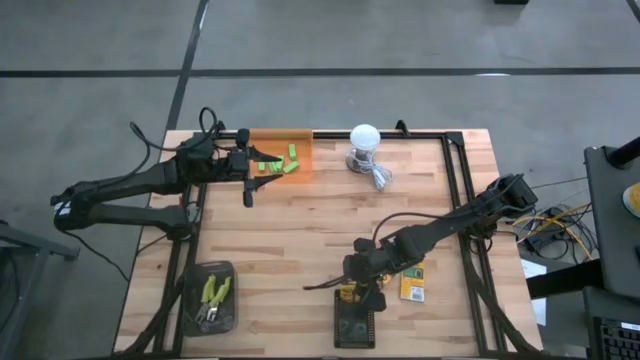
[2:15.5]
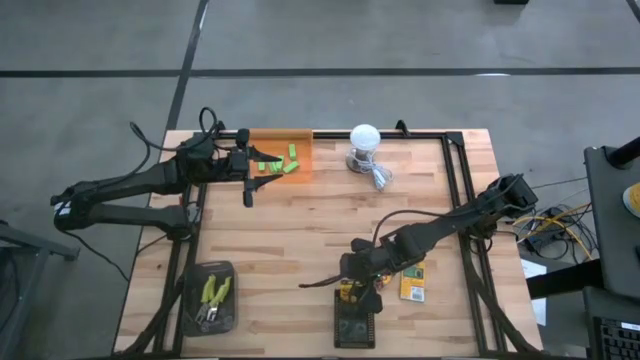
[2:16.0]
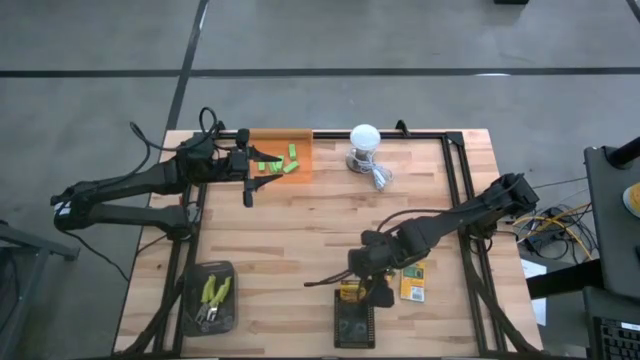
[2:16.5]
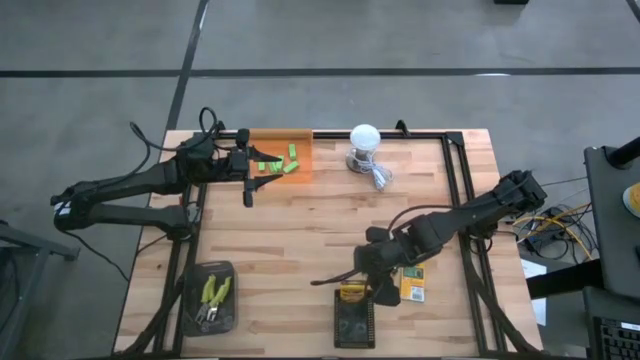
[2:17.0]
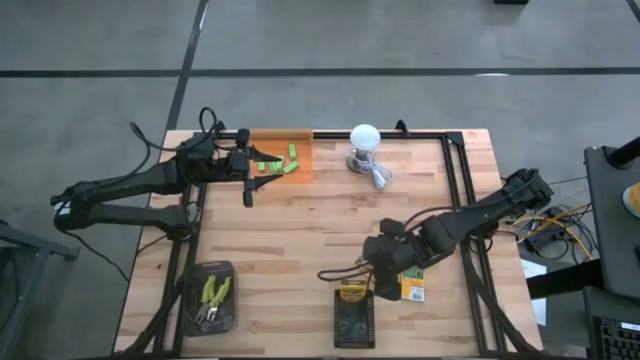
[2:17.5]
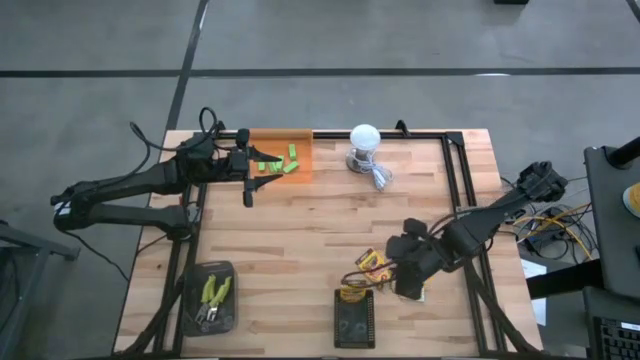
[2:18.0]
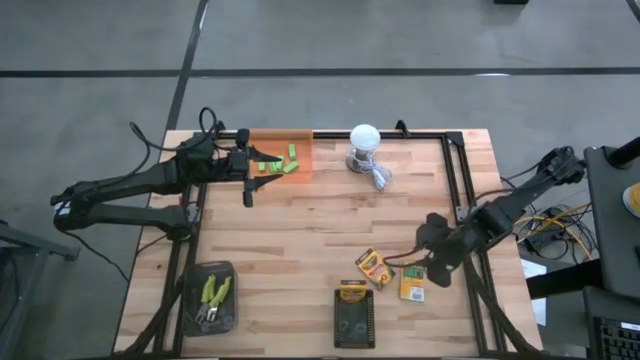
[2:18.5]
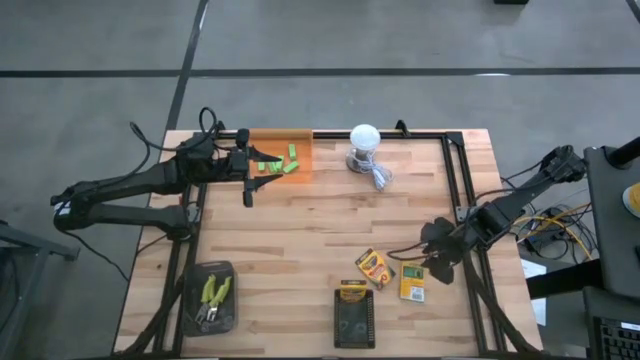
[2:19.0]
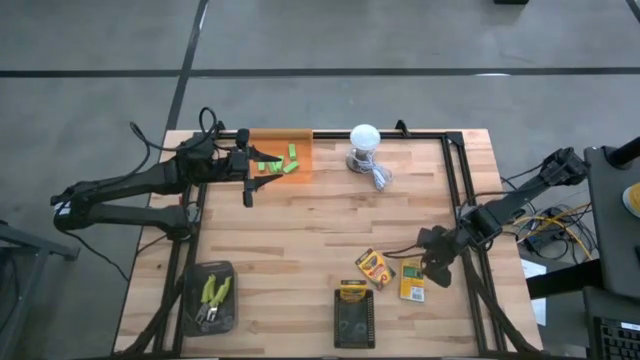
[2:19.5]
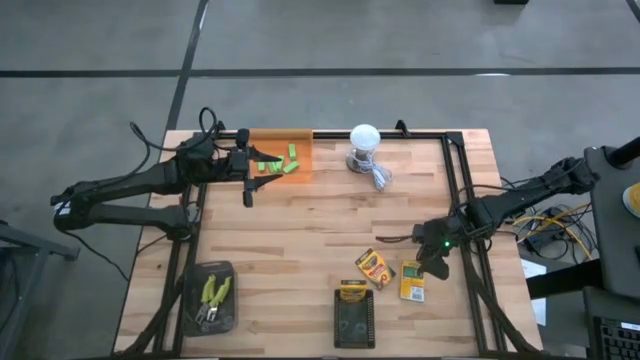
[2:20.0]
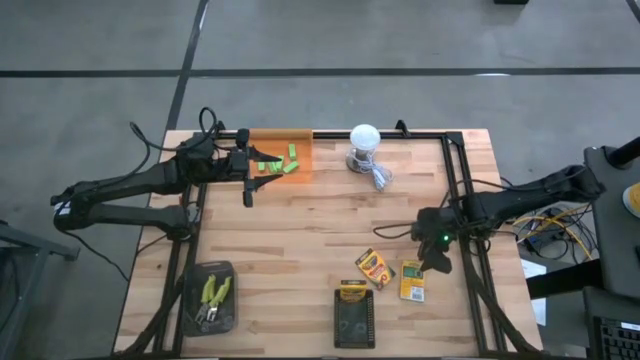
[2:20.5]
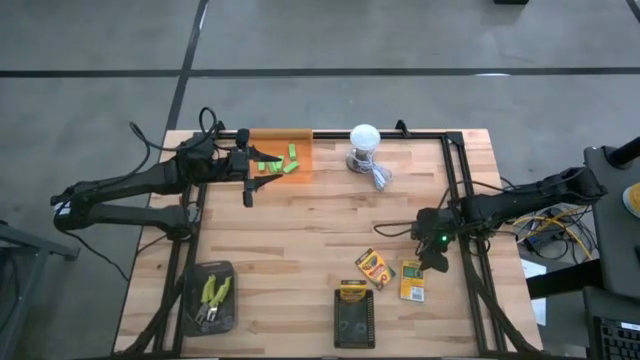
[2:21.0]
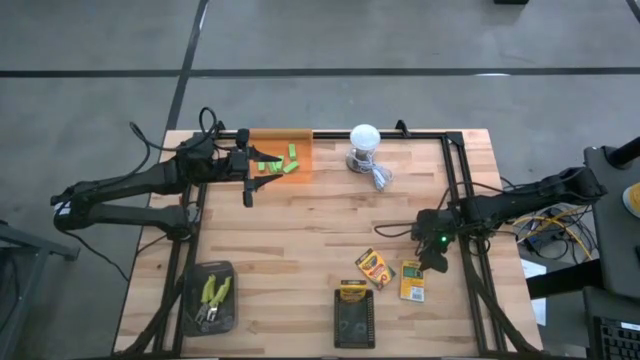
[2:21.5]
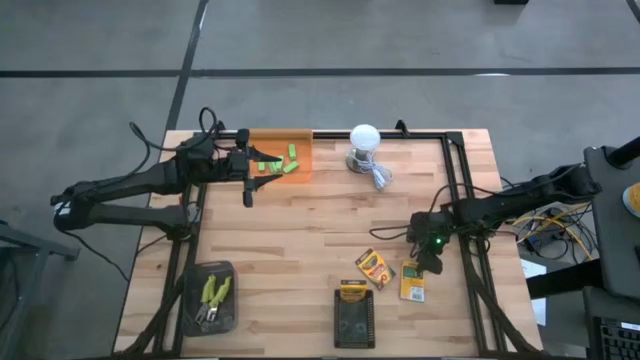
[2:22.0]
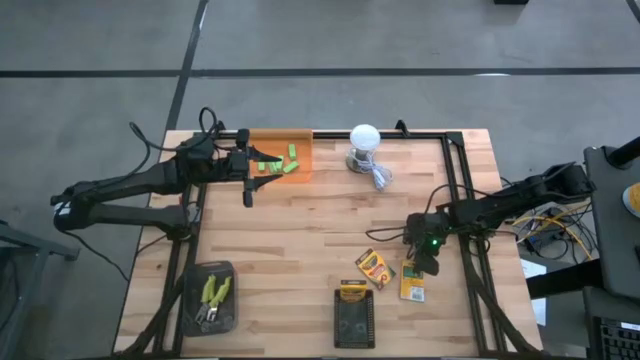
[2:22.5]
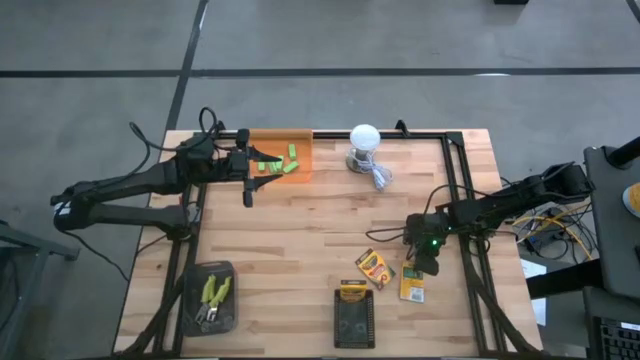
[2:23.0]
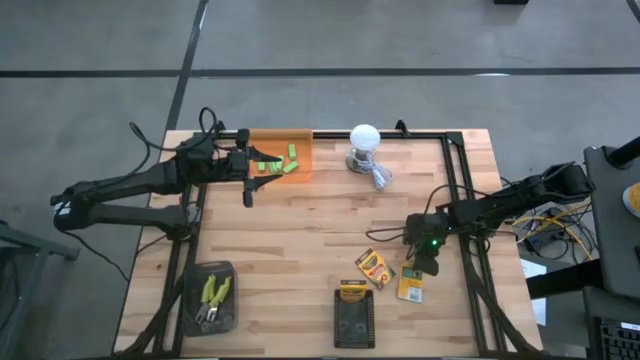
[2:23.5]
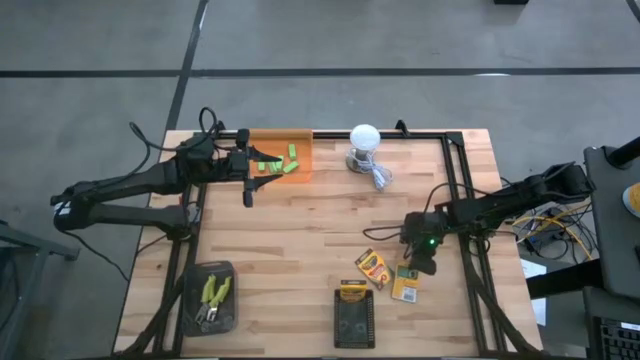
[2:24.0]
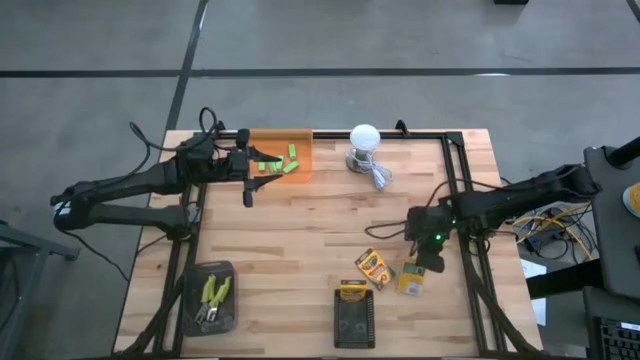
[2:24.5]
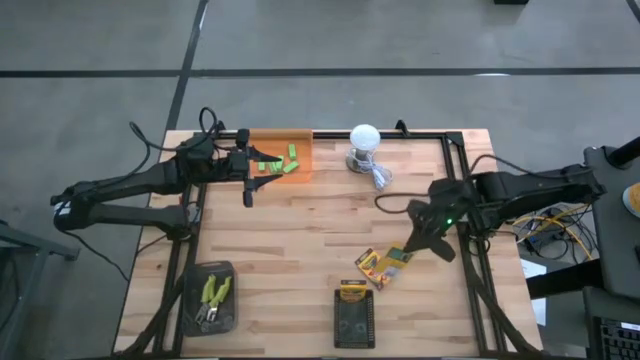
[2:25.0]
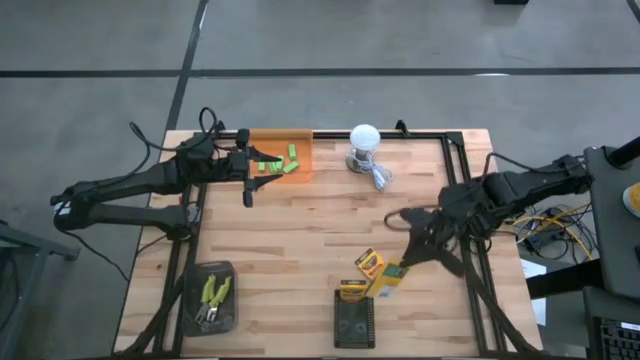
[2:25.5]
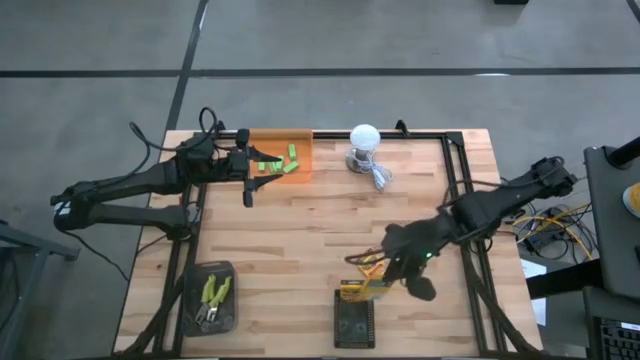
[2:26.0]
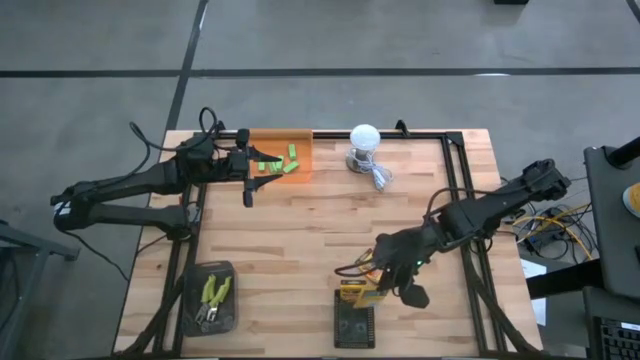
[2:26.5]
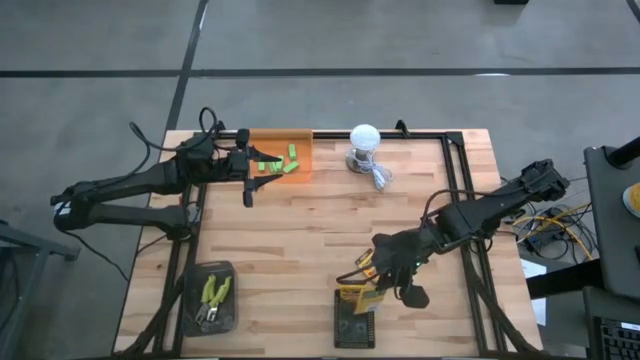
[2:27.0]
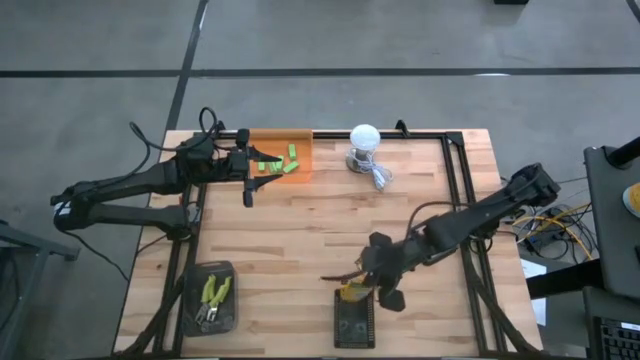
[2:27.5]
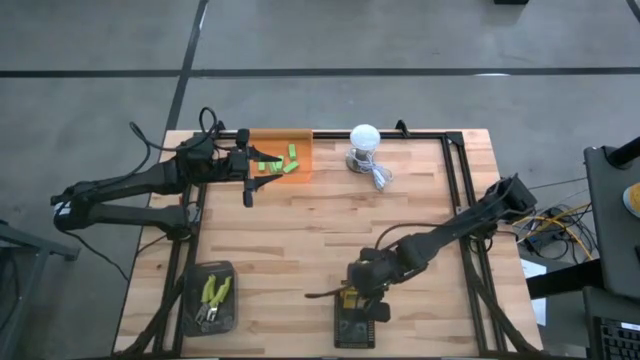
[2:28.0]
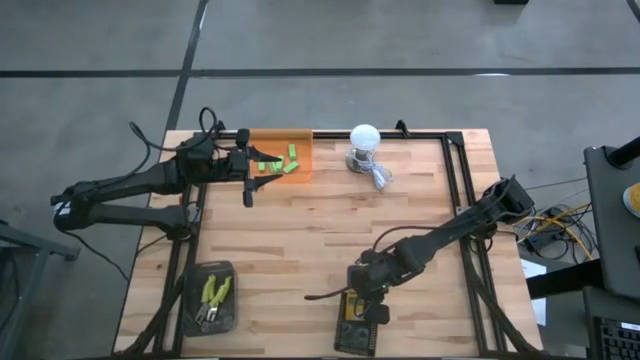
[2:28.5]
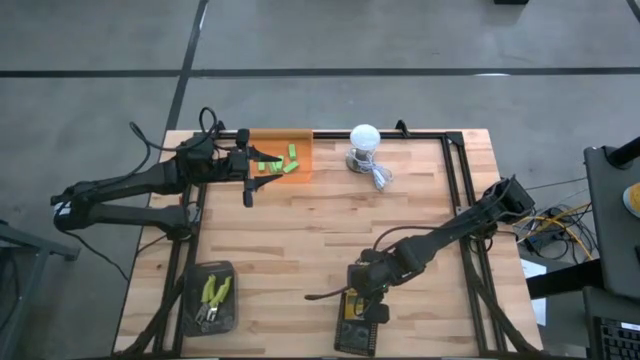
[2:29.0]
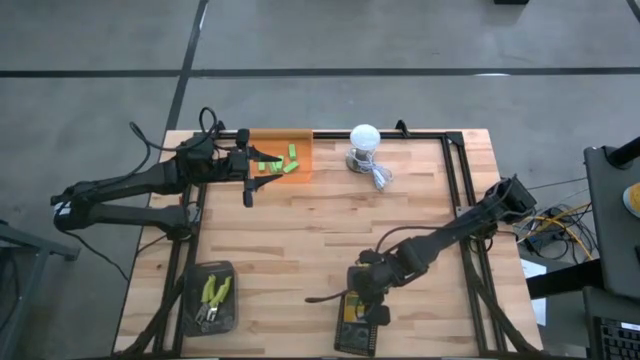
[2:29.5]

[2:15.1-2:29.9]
Task: Pick & Place School Supplies
Put the crayon box into the right black bin
